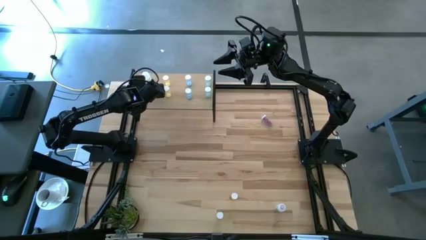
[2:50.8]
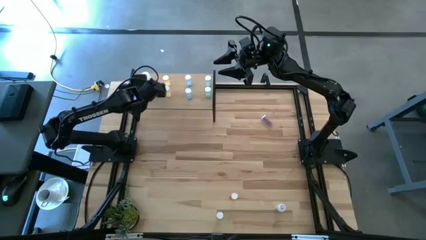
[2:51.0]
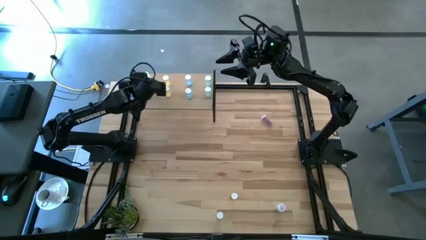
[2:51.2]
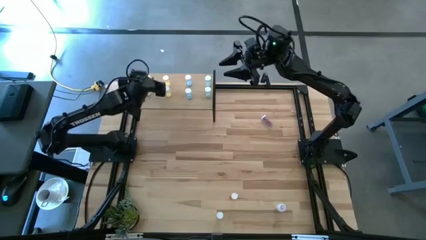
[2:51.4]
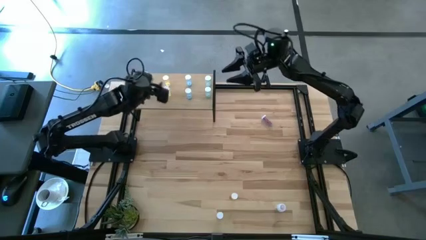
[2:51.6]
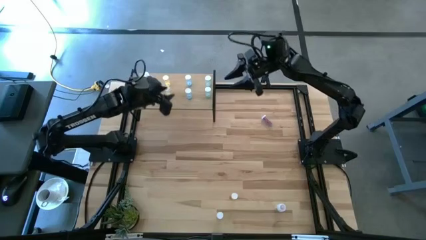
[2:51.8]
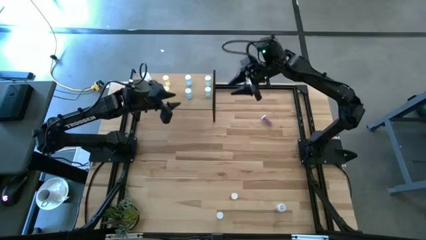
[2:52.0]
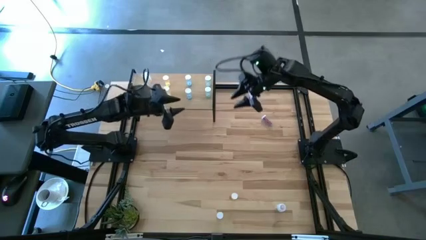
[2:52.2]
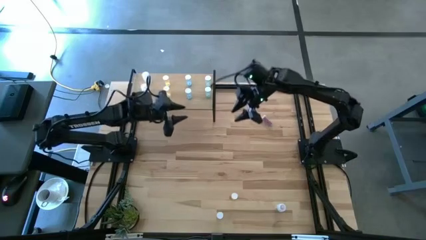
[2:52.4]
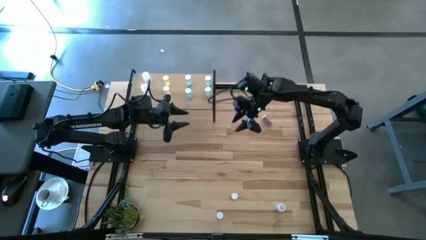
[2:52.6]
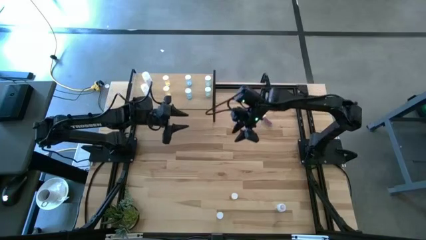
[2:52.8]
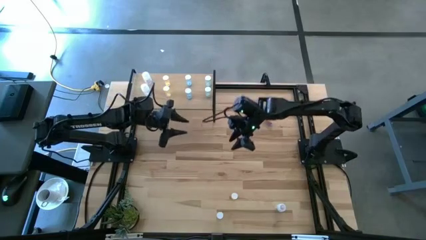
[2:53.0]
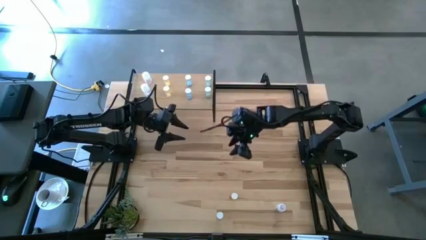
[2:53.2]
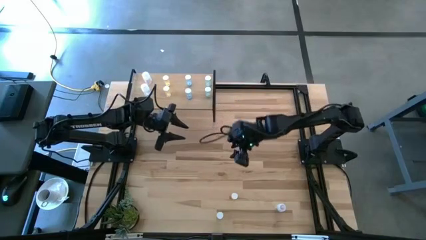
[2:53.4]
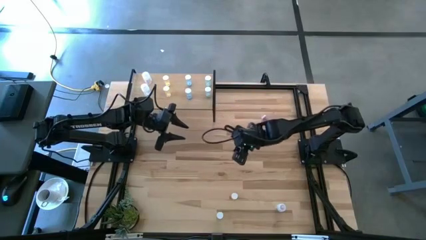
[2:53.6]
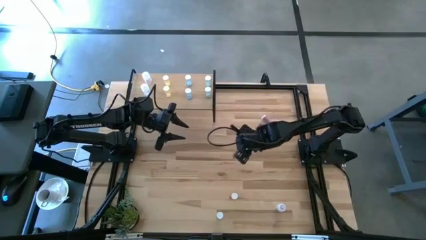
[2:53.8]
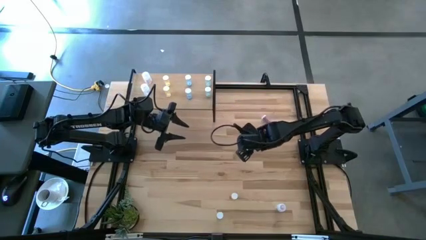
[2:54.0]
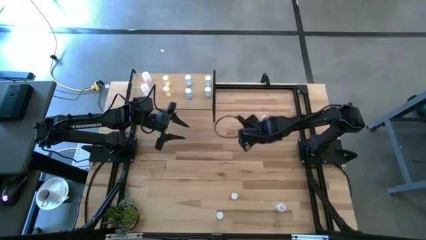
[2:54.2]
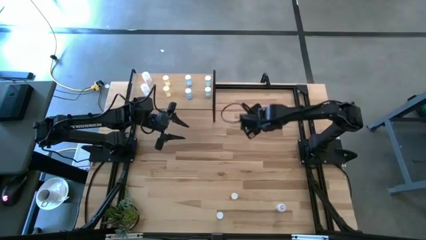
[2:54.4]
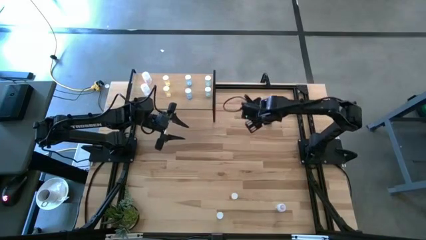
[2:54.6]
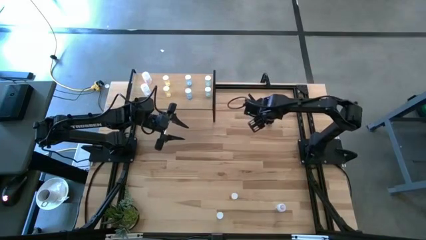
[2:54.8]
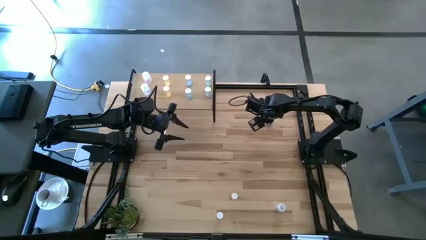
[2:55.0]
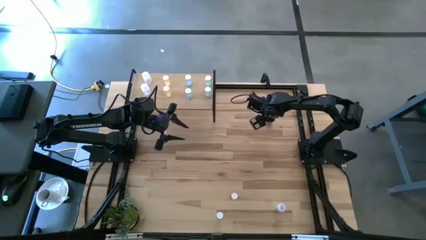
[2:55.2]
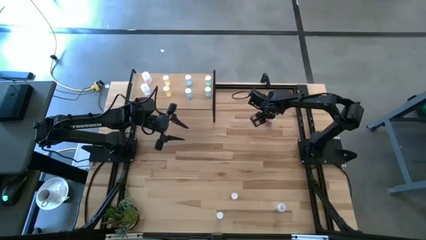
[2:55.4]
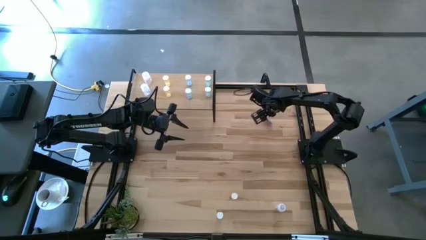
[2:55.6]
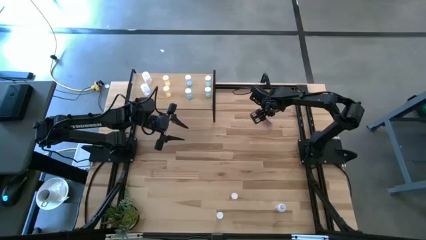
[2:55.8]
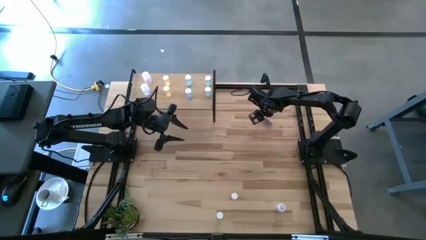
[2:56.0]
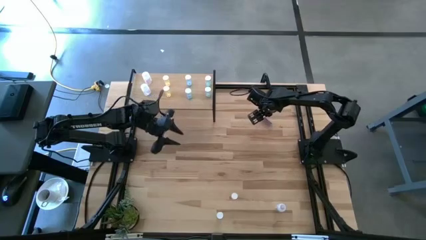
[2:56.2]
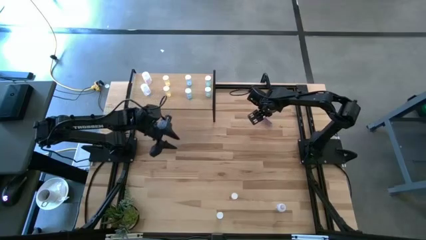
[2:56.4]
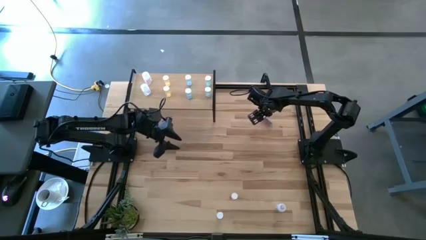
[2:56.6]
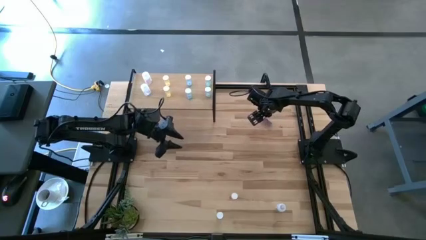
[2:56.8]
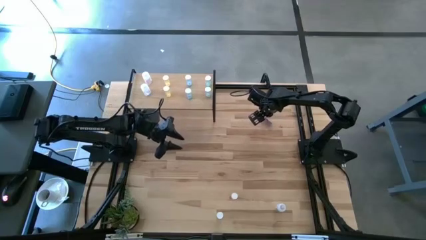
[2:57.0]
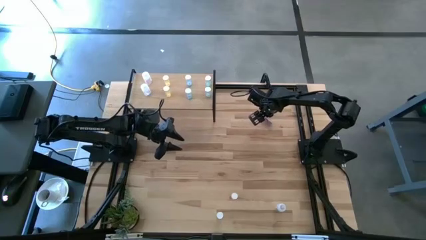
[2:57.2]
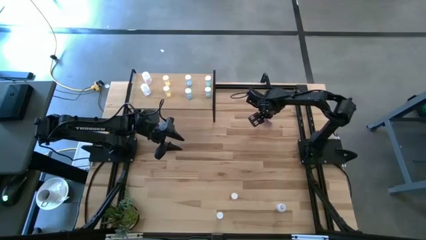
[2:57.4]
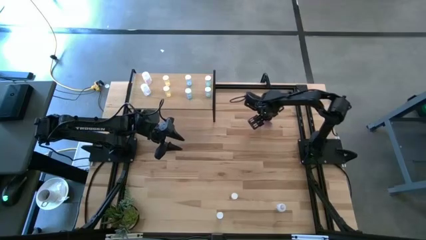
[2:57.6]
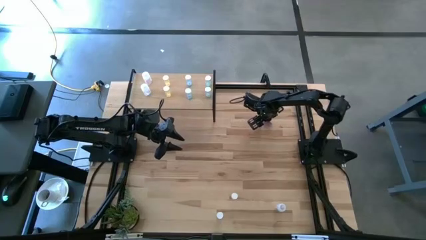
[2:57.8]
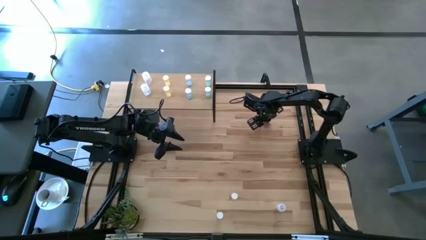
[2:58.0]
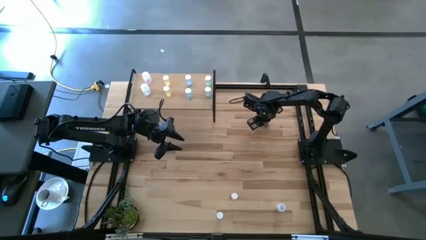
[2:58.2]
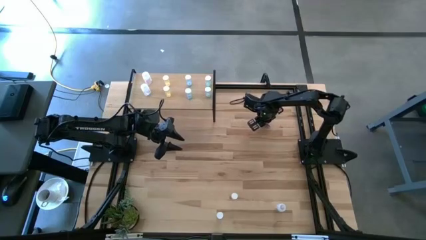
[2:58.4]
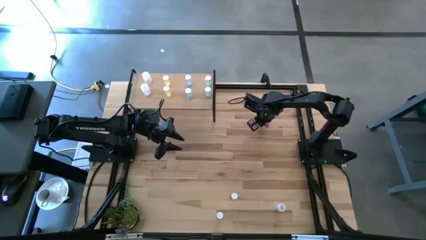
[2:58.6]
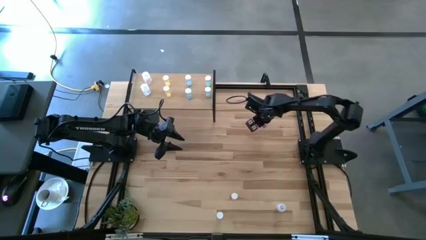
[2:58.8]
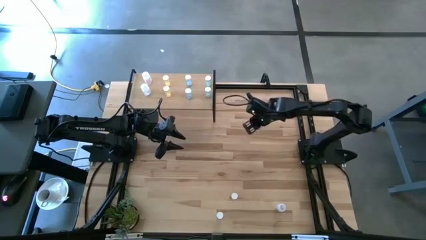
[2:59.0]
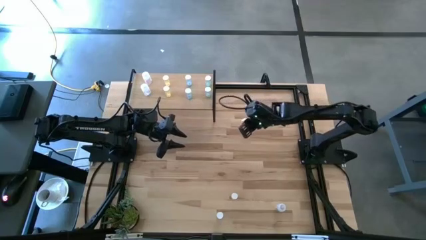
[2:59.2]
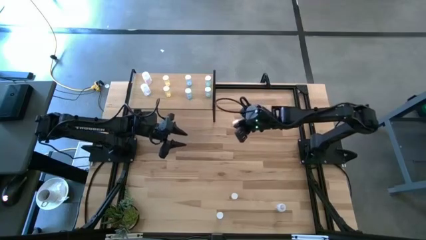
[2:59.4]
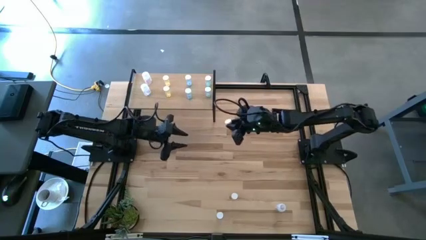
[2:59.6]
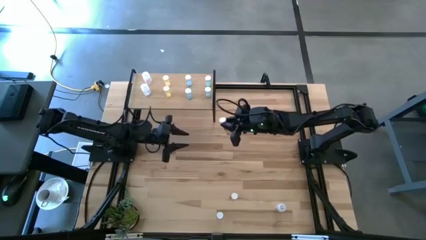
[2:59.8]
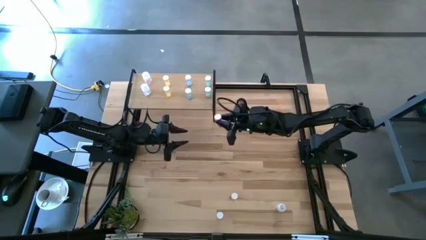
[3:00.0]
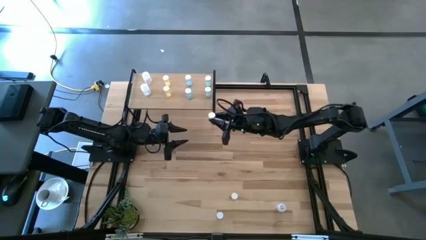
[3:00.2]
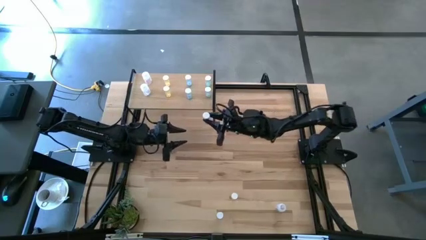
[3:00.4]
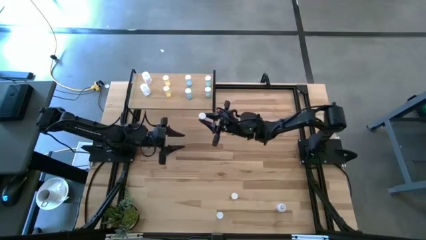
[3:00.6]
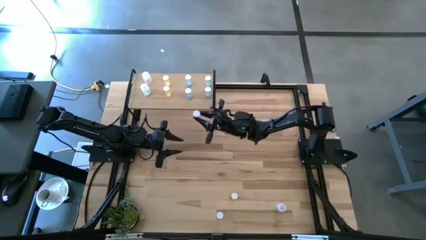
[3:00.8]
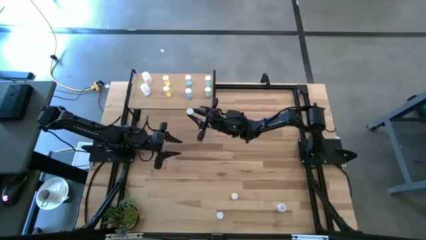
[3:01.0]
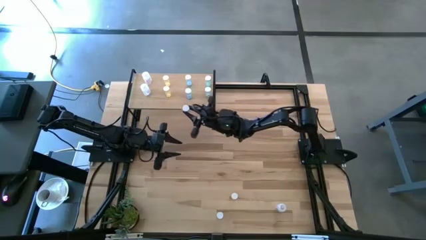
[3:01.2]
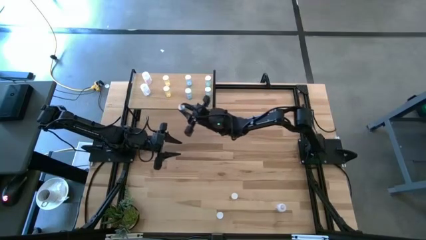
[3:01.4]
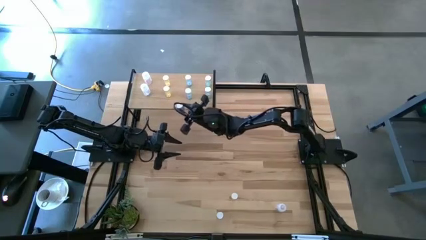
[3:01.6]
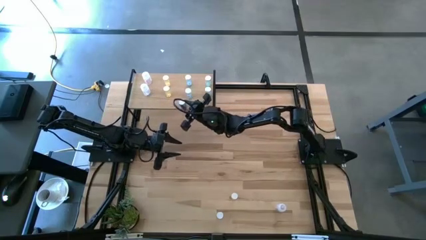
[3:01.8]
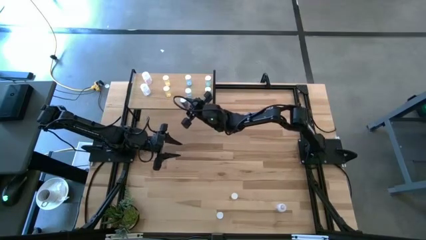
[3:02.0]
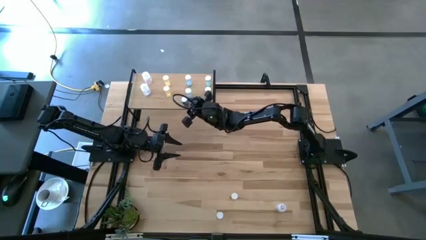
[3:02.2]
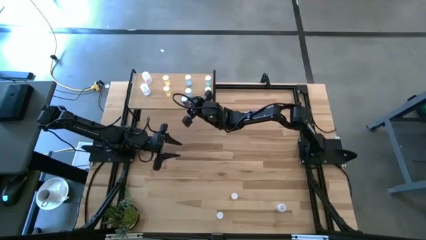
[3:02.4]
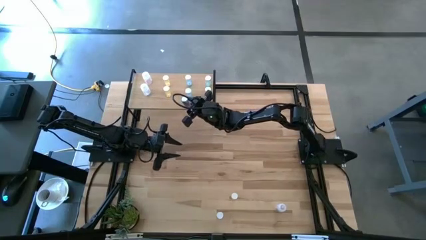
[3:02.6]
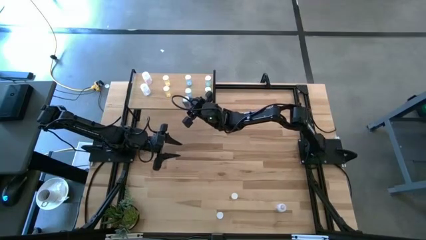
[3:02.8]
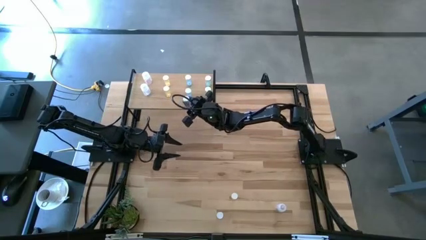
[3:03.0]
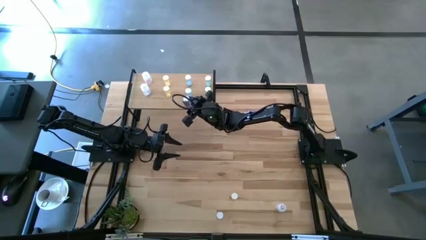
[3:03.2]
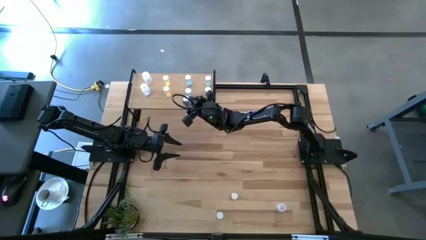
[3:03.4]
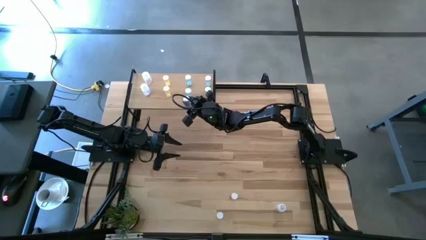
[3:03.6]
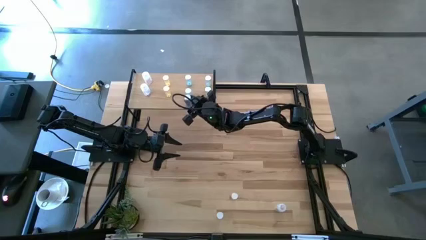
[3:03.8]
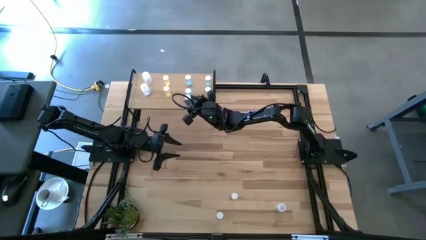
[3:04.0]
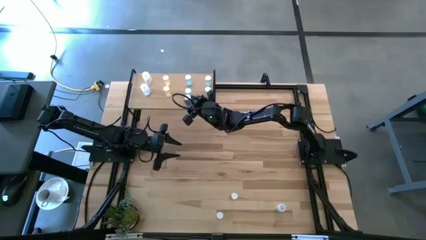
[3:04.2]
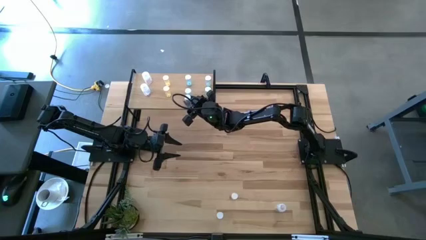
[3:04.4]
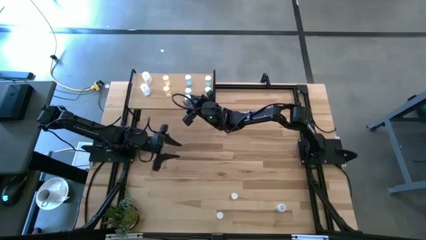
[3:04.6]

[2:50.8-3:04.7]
Task: Pick and place medicine bottles onto shelf by color
Put the blue pill bottle on the shelf aligned with the other blue pill bottles
